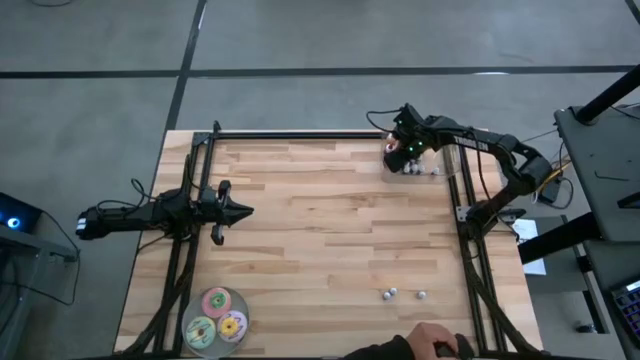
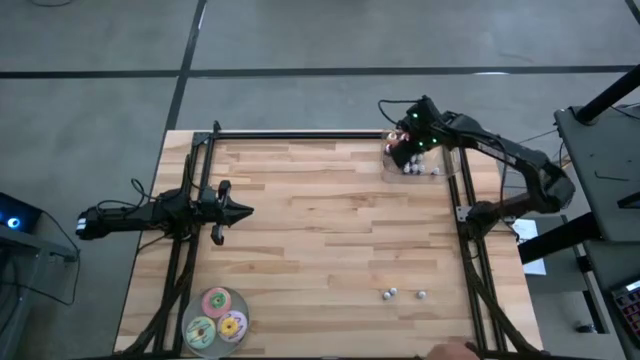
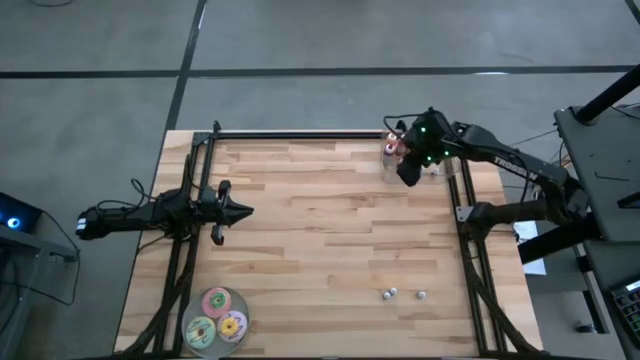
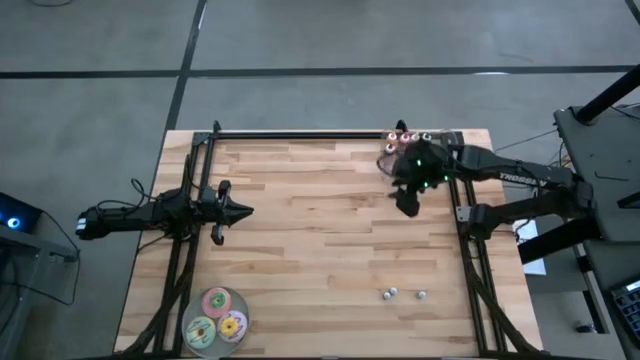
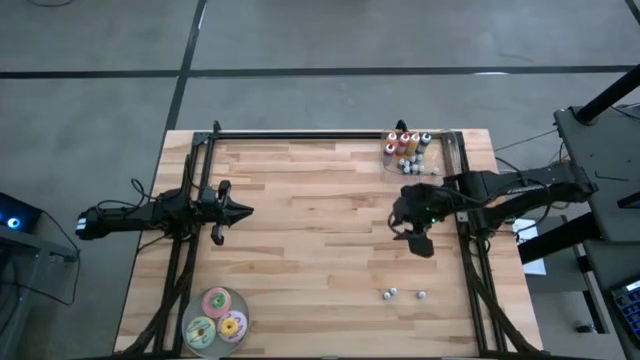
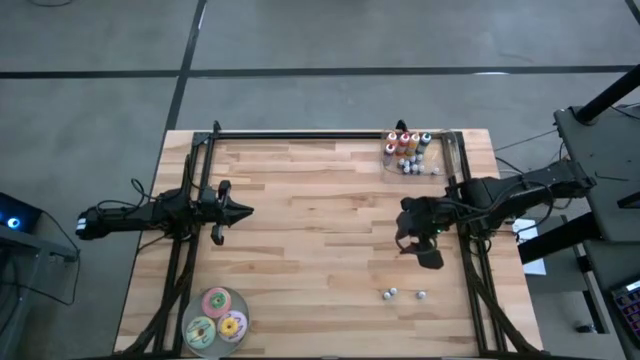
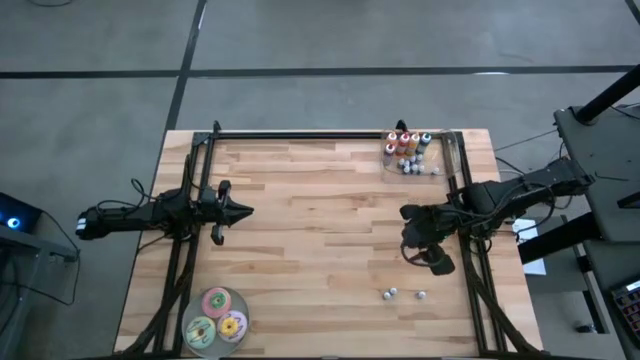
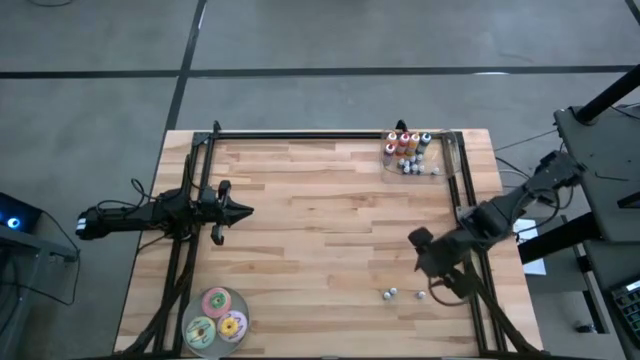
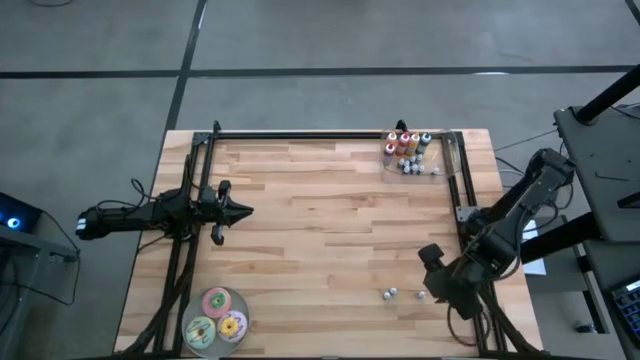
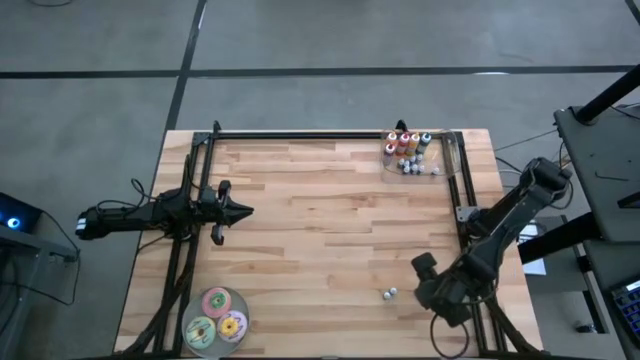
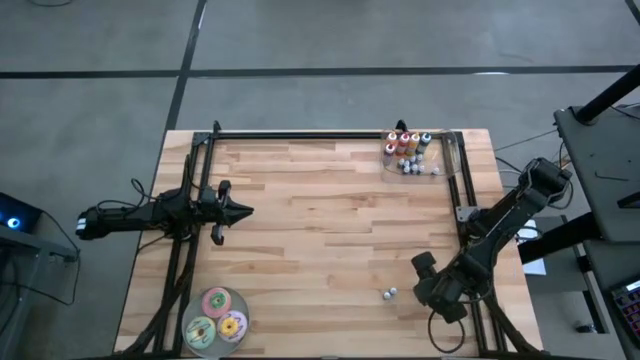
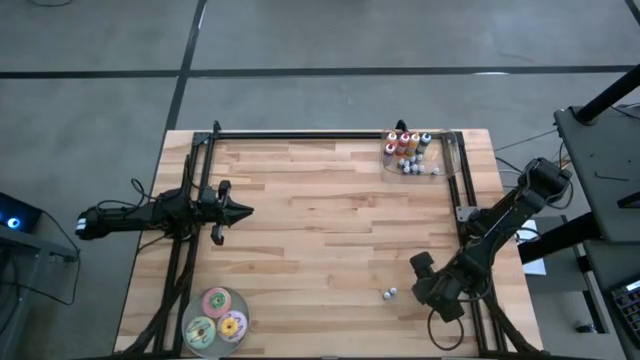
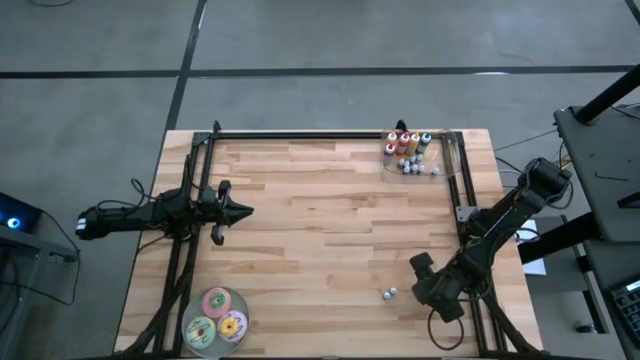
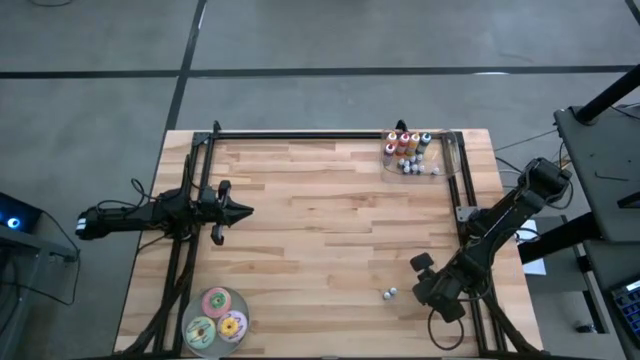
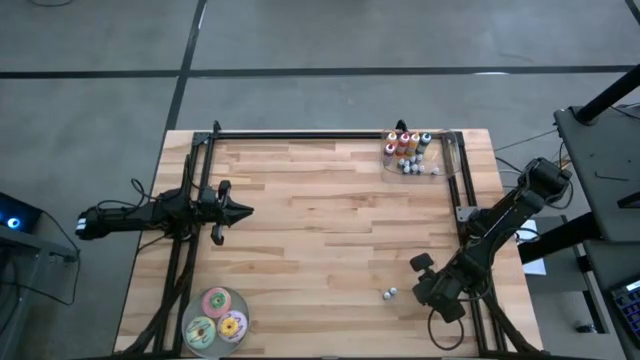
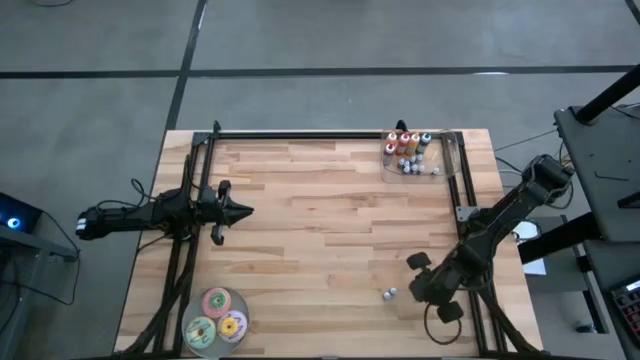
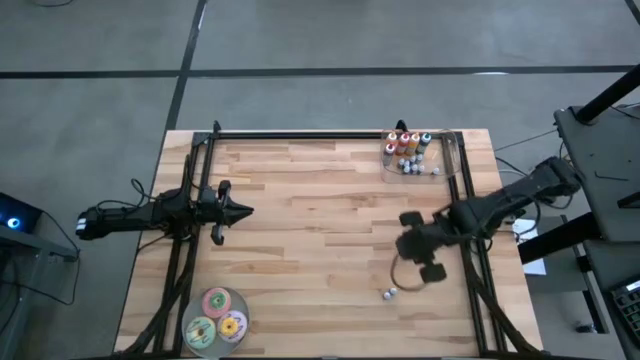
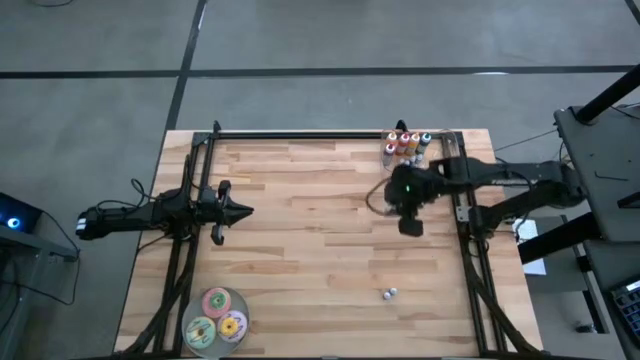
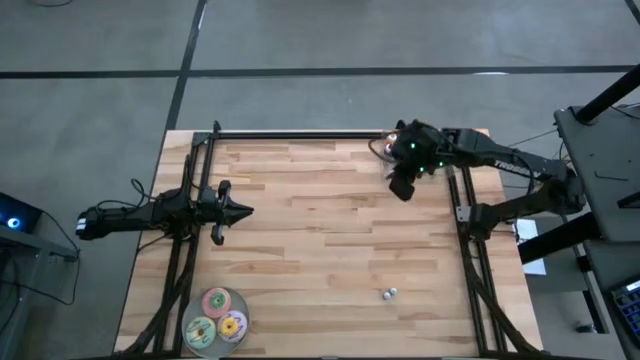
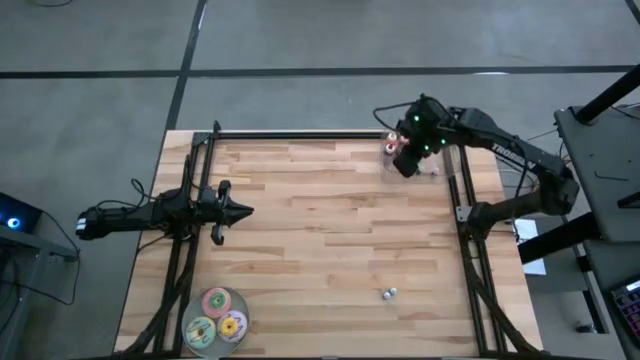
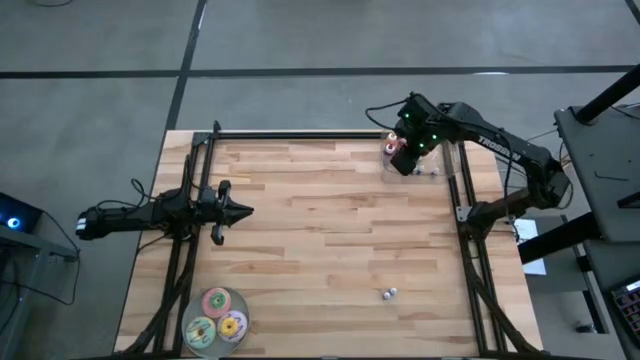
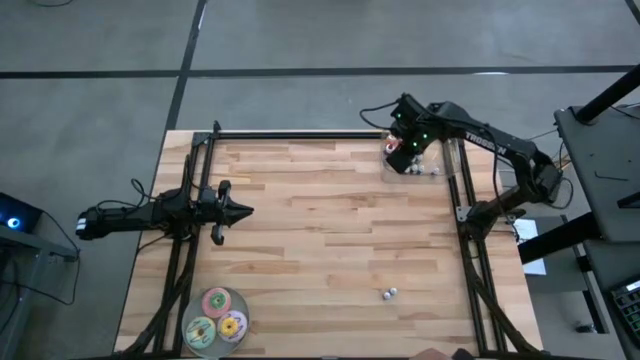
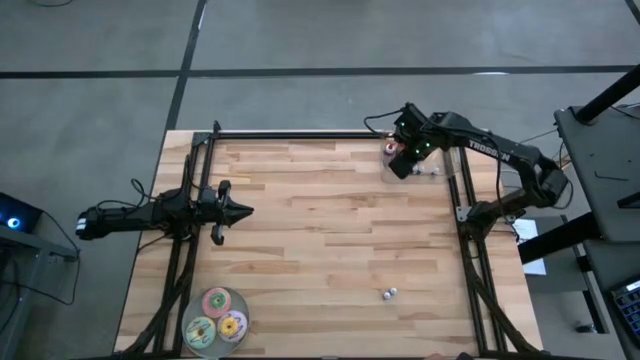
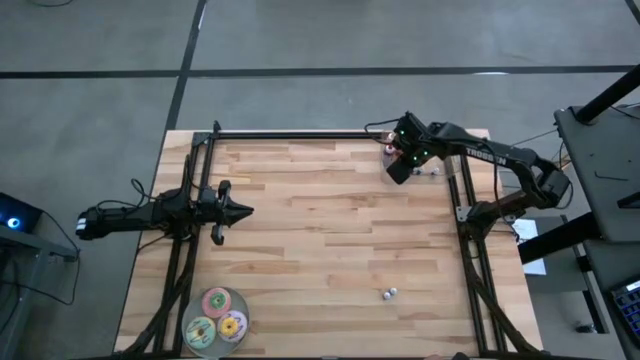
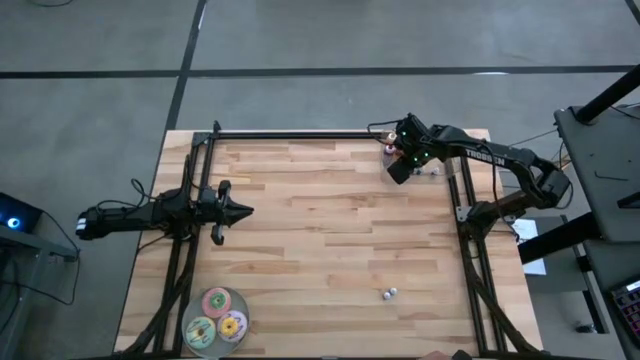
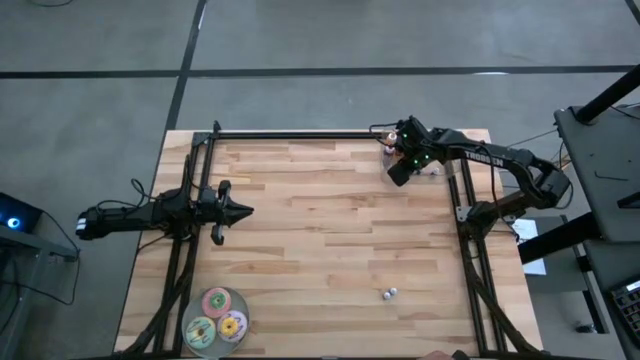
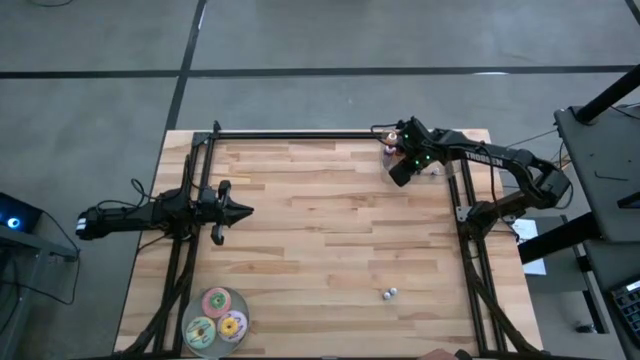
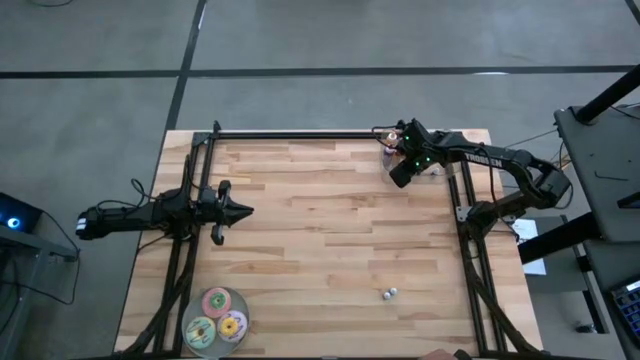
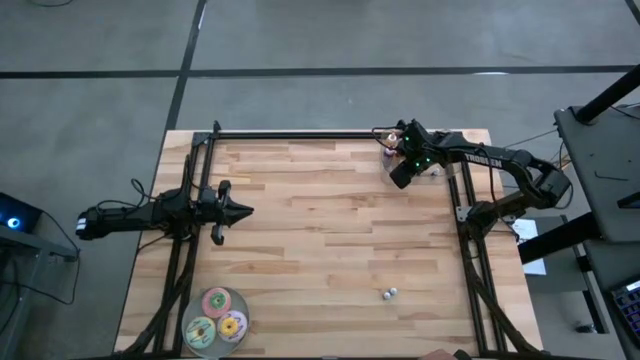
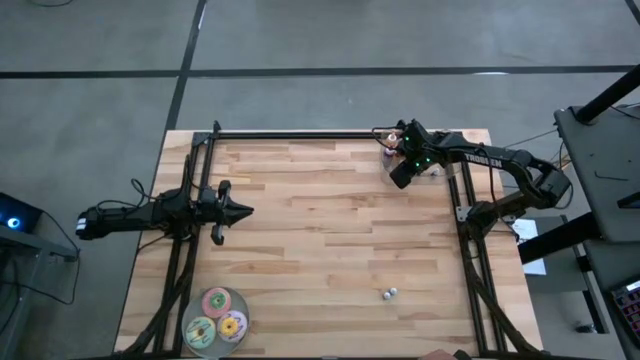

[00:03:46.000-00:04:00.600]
Task: Pick & Place food coloring
Put the small purple food coloring bottle into the bin

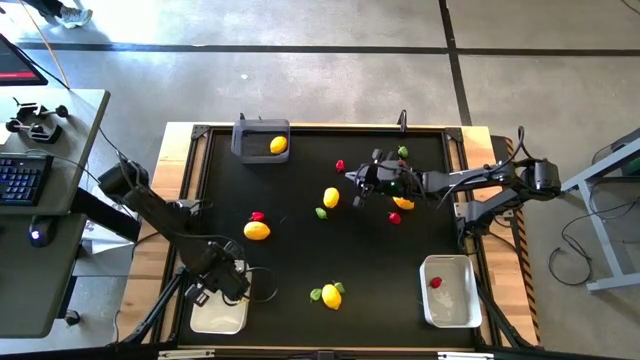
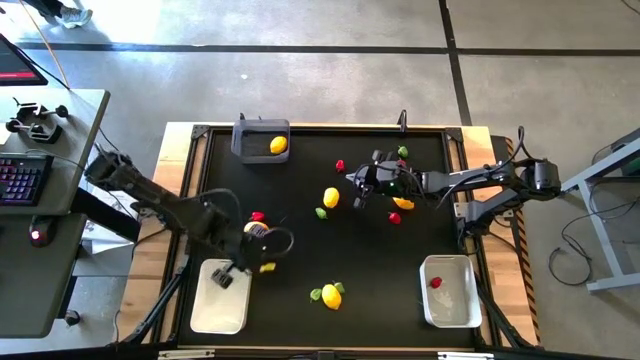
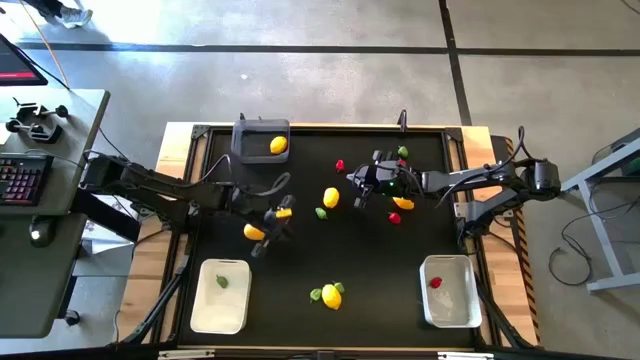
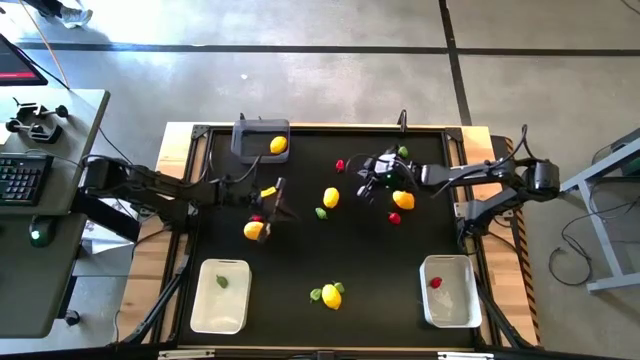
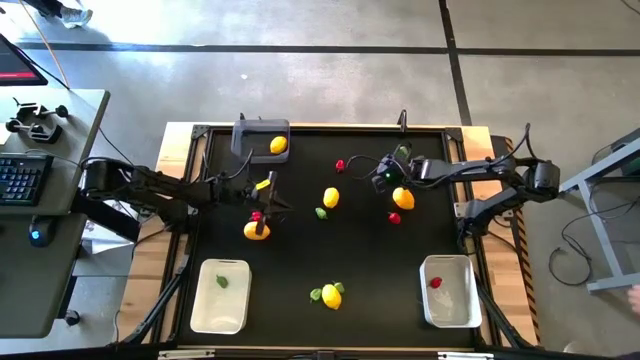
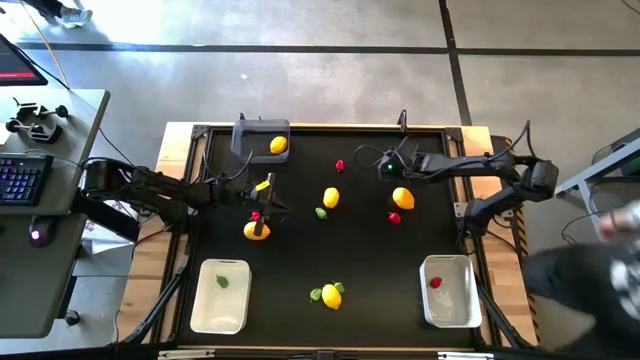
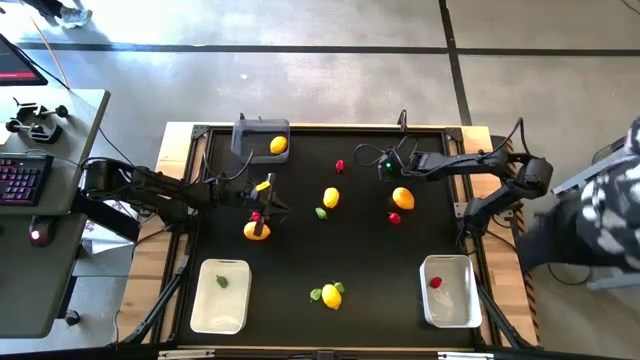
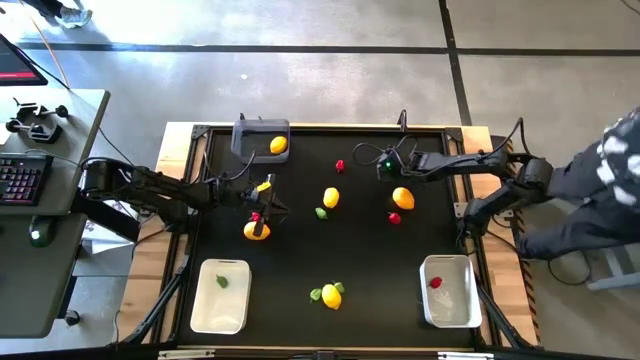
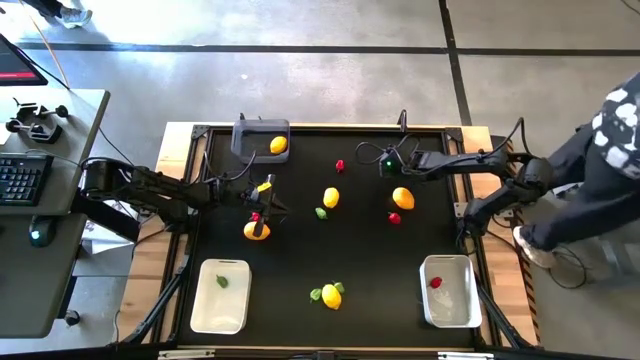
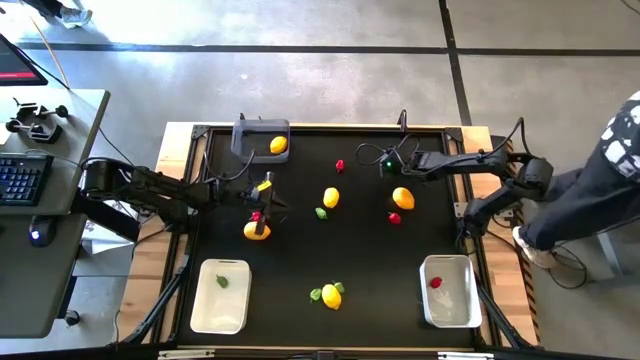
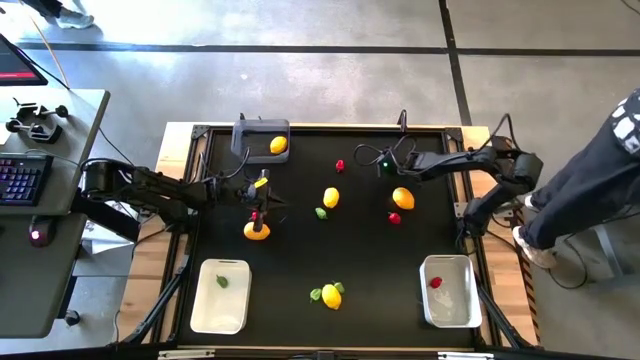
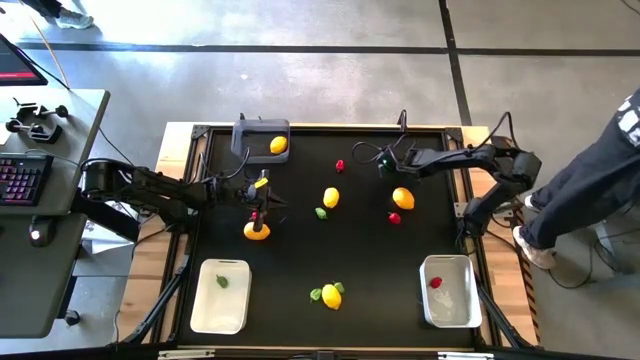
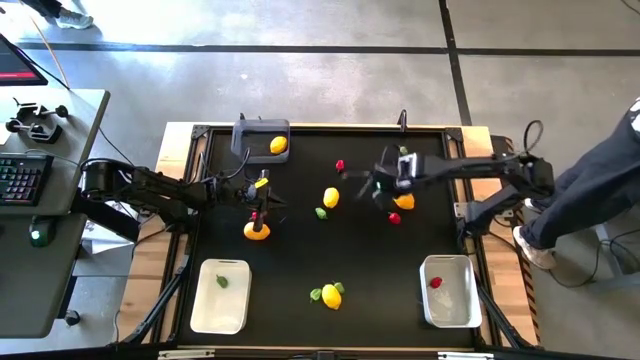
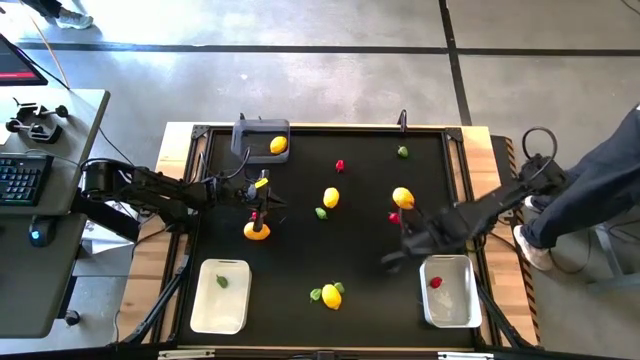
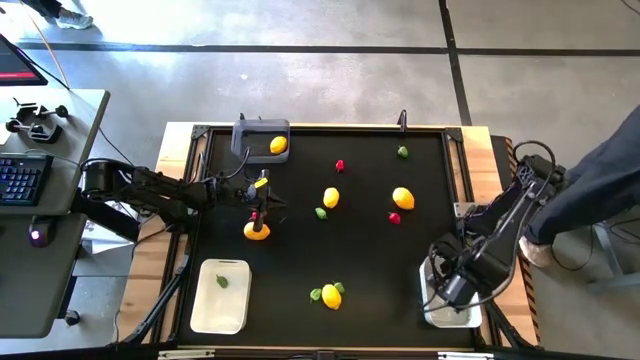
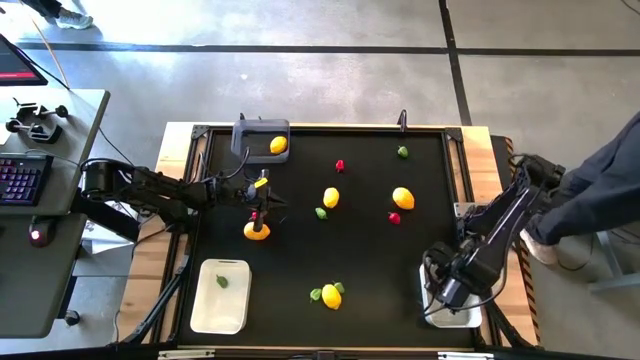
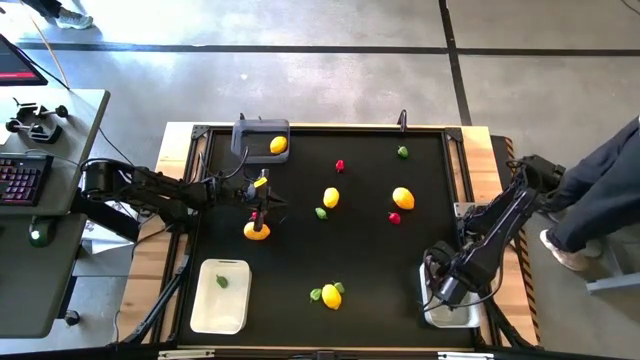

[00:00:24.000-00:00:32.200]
Task: Sort produce into baskets
Put the red chili pepper into the gray bin
